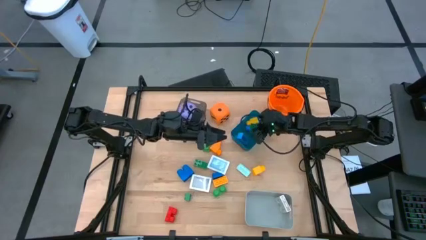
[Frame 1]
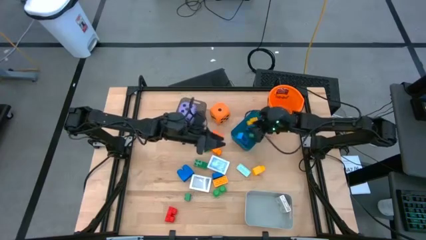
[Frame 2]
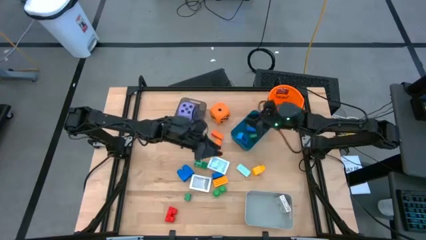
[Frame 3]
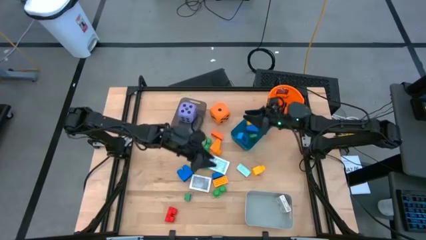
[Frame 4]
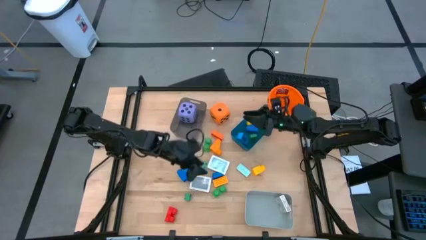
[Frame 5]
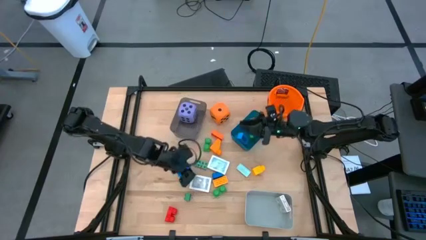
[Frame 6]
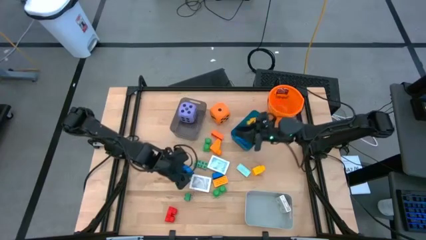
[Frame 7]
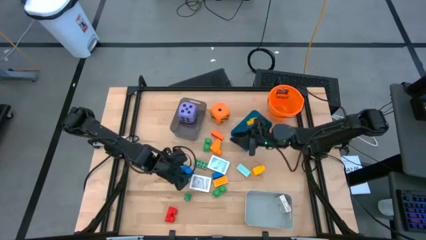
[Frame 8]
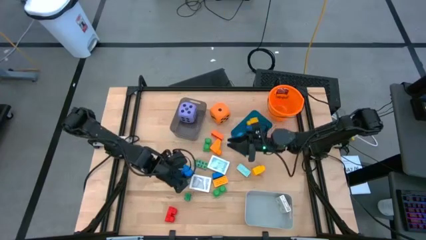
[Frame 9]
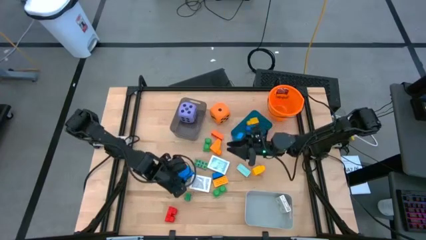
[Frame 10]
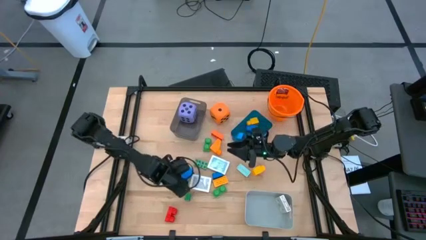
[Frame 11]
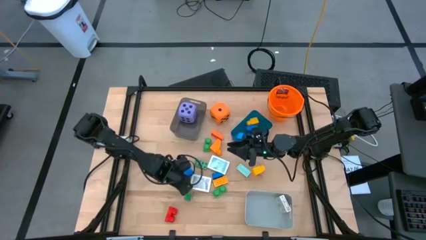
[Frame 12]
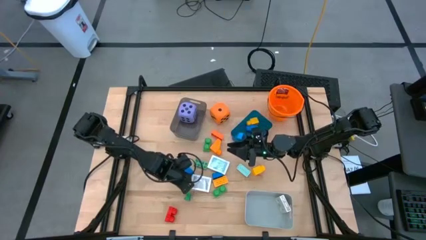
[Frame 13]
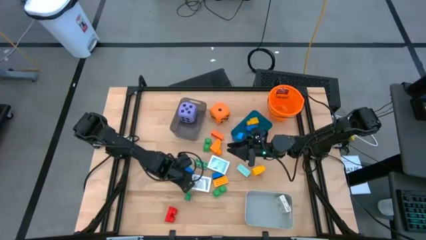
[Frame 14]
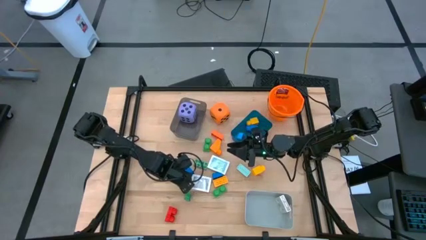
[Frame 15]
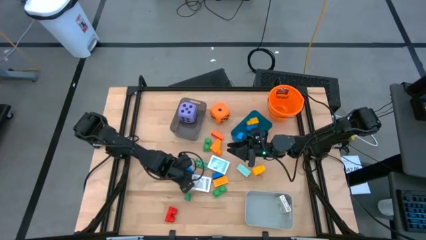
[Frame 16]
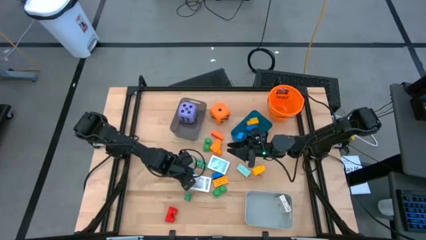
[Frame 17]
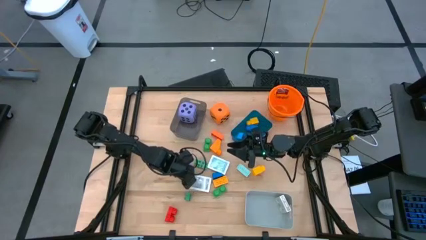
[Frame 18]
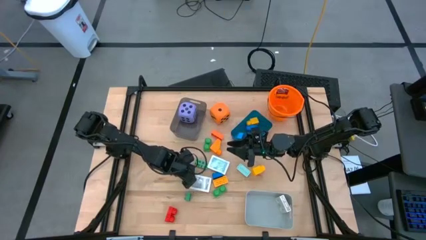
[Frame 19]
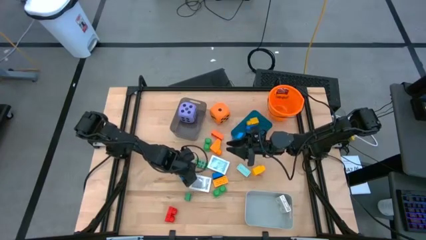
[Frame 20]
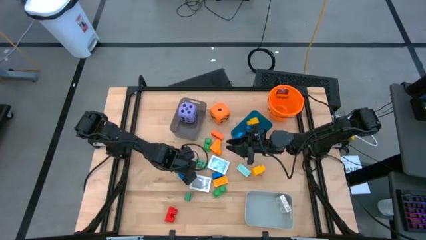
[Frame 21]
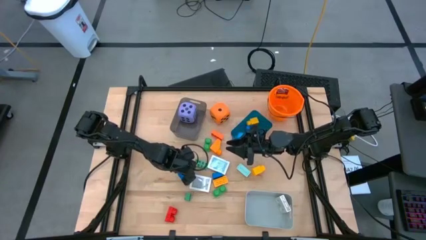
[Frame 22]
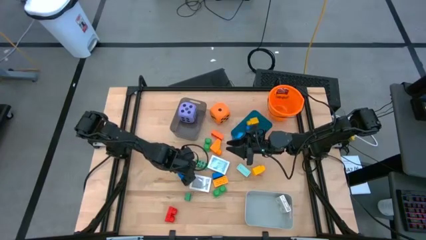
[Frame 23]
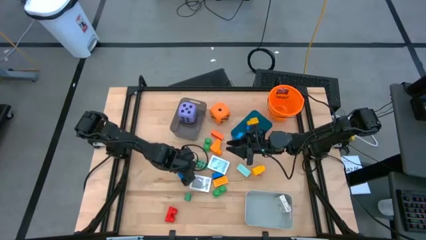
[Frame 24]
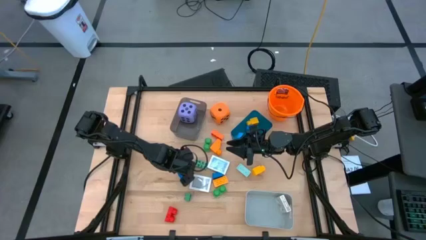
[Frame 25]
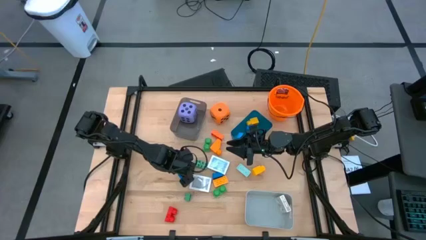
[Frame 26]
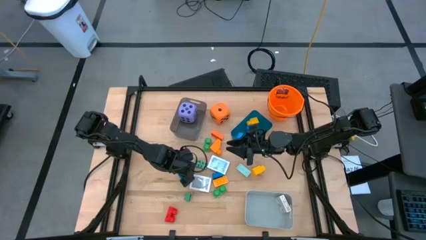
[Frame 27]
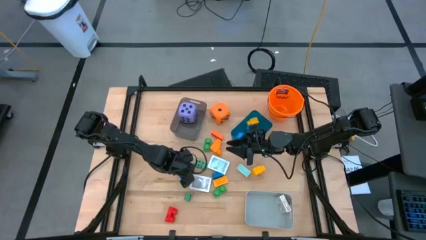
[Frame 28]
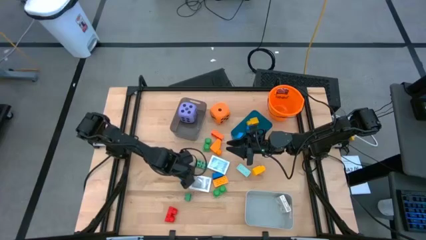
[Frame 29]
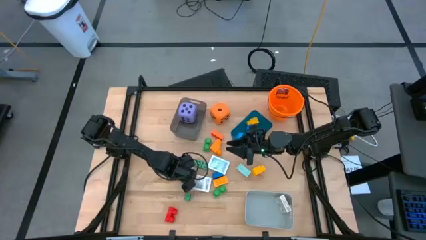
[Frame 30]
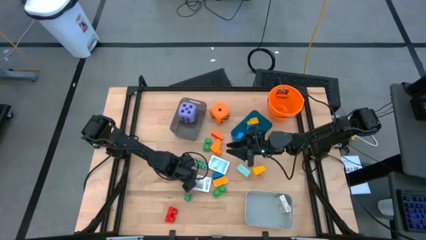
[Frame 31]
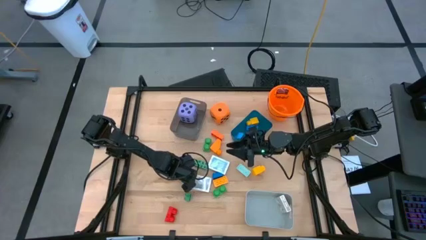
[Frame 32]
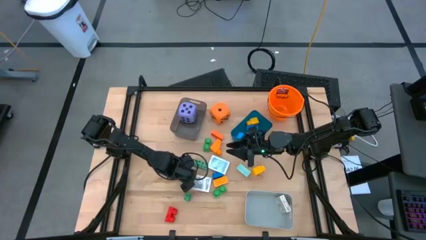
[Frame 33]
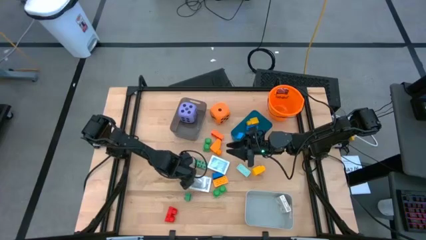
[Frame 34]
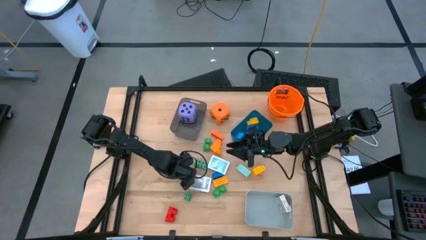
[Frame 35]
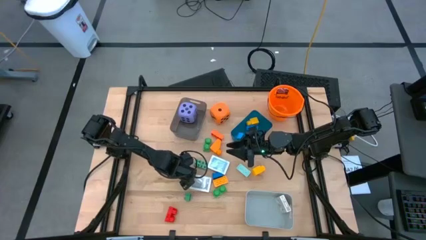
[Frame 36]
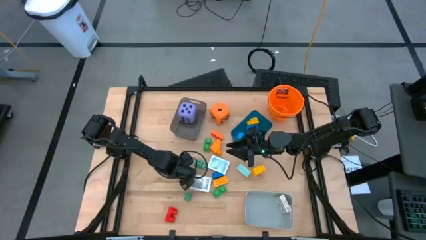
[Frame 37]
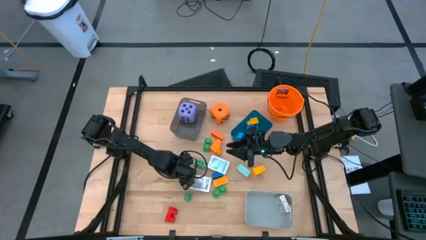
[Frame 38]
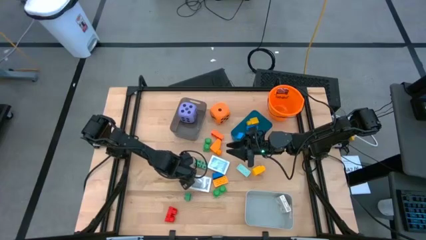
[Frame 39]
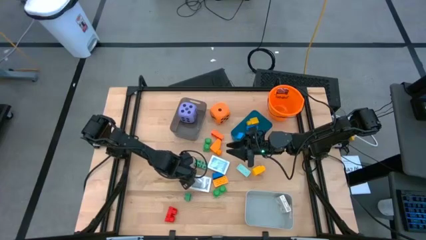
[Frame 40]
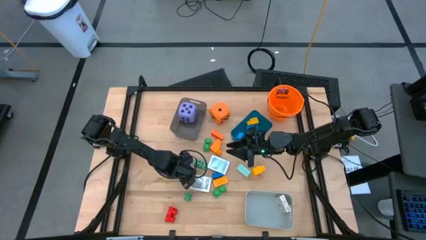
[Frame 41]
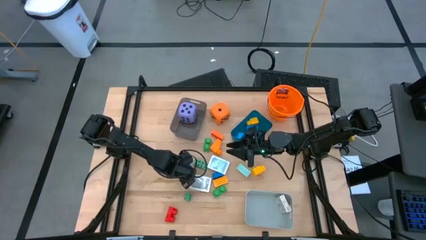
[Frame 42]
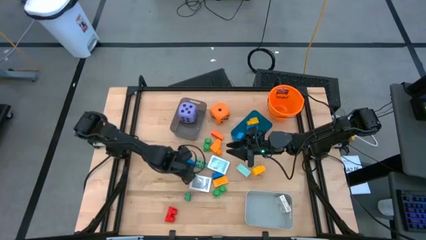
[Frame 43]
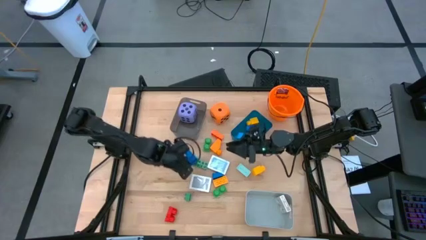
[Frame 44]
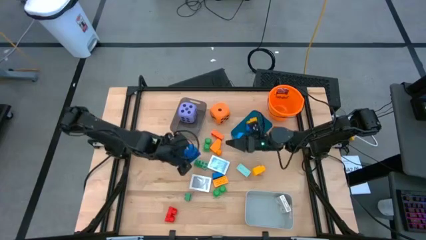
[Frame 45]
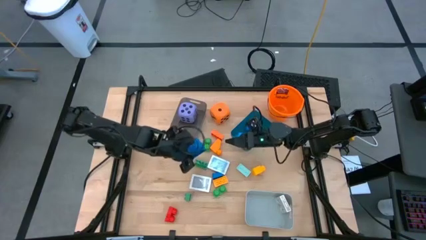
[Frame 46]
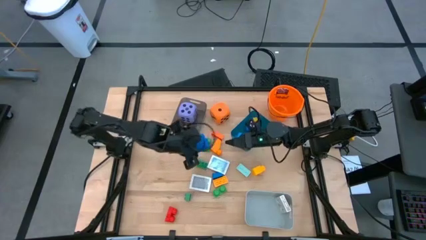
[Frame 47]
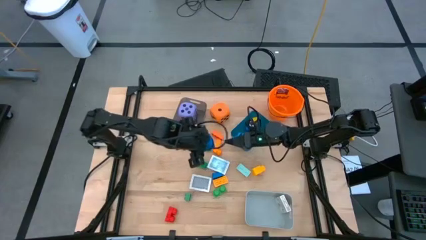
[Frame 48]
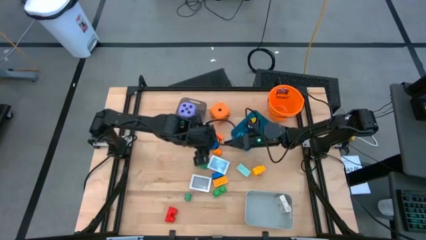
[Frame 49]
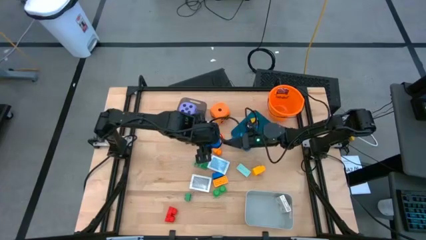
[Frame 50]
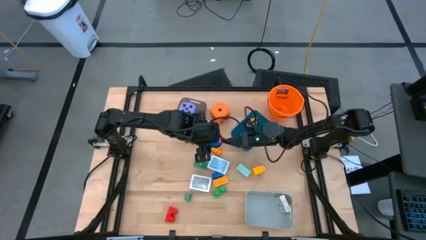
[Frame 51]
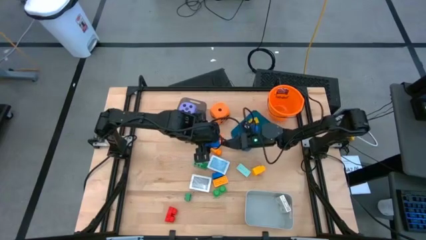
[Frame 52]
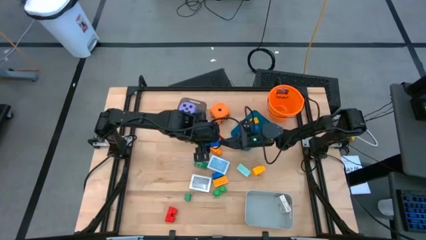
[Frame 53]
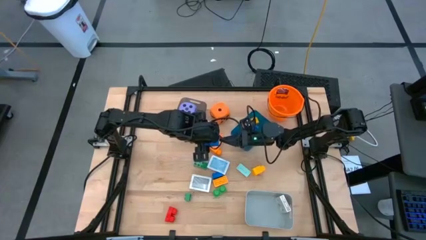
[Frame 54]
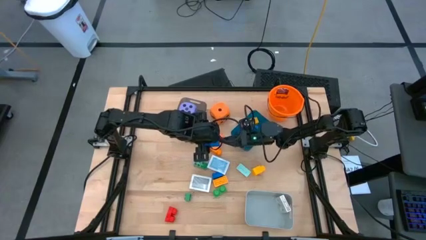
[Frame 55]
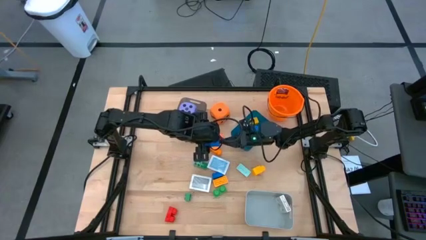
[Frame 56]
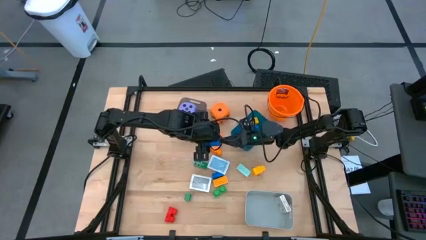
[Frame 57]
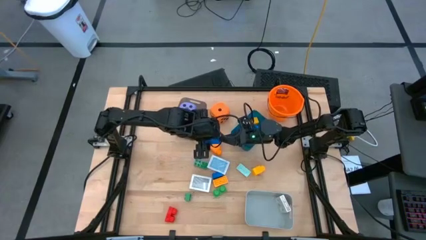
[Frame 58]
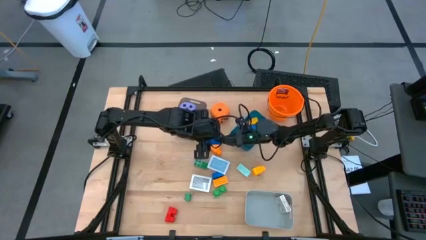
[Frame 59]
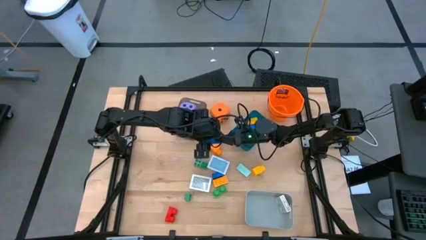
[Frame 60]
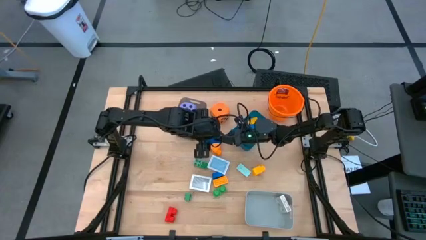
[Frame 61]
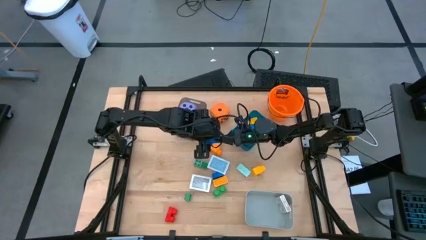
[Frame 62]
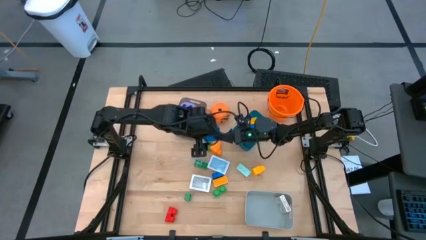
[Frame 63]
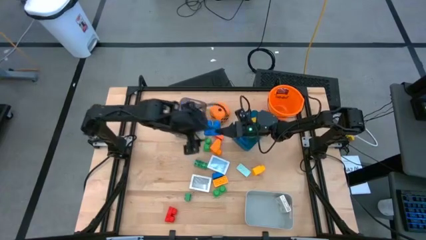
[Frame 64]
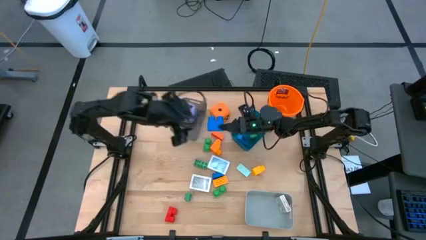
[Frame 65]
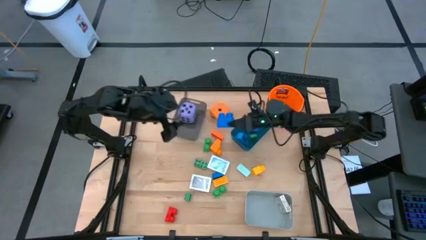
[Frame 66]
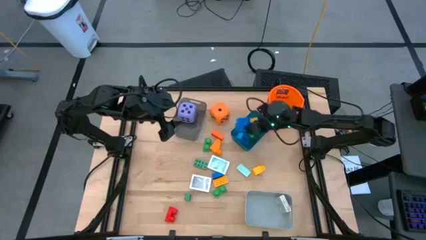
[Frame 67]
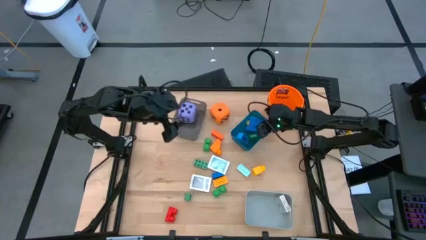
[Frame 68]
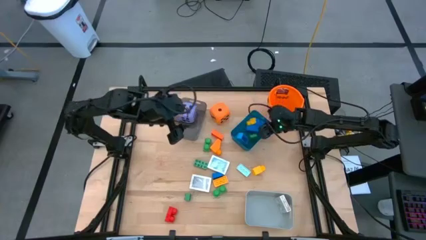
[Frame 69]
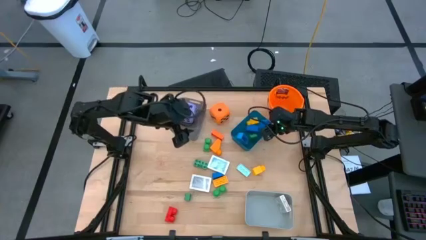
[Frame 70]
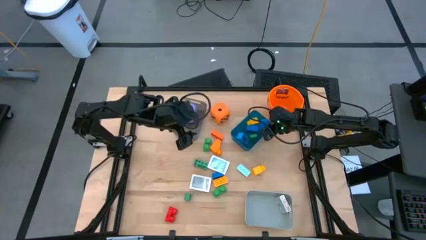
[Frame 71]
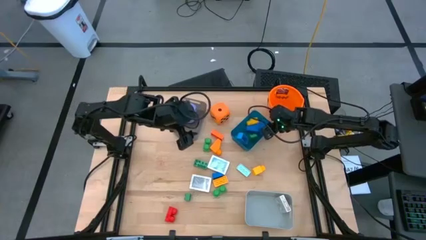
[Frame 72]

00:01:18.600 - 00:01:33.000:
Task: Pick & Place Toys
Put the left blue game piece into the blue bin

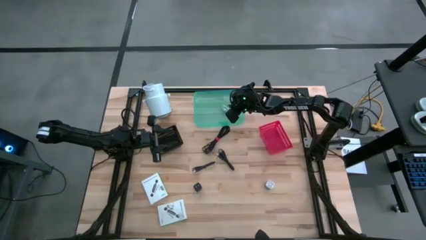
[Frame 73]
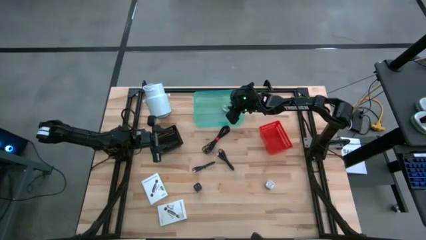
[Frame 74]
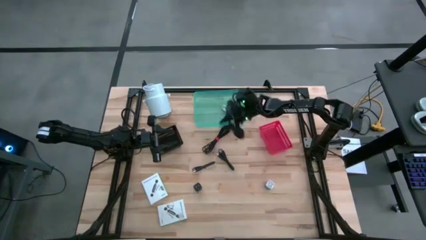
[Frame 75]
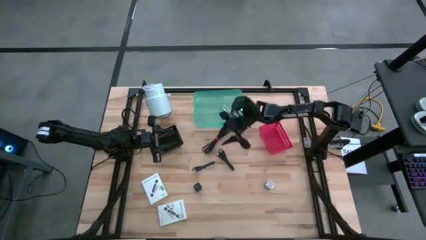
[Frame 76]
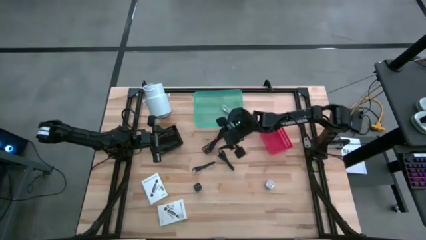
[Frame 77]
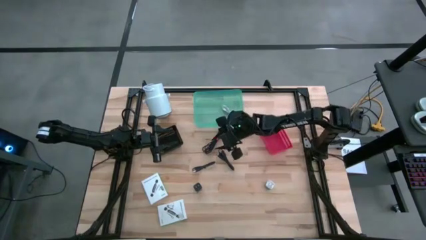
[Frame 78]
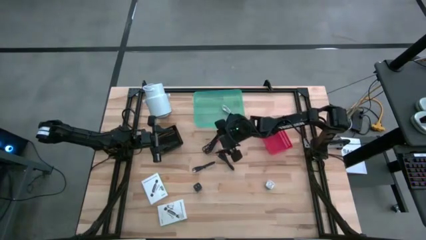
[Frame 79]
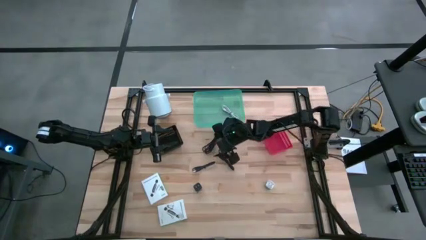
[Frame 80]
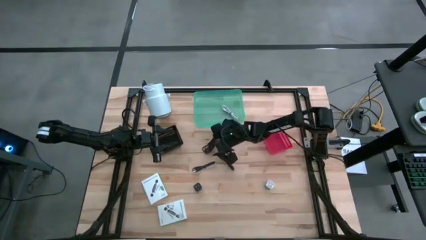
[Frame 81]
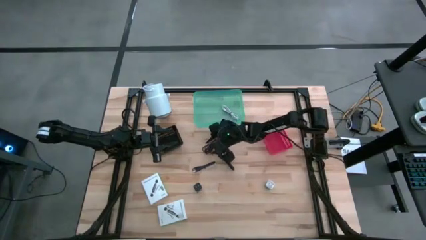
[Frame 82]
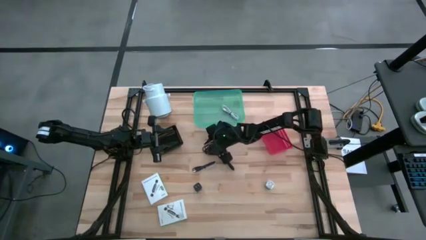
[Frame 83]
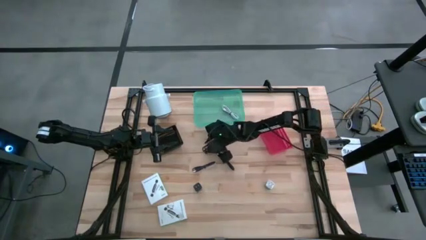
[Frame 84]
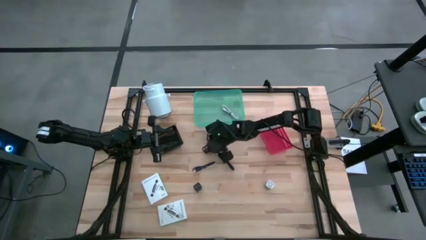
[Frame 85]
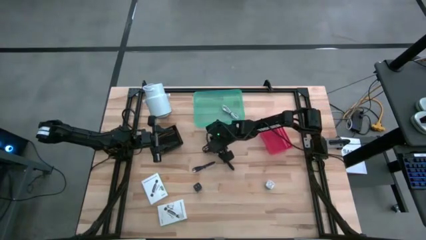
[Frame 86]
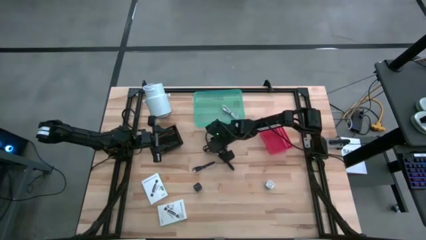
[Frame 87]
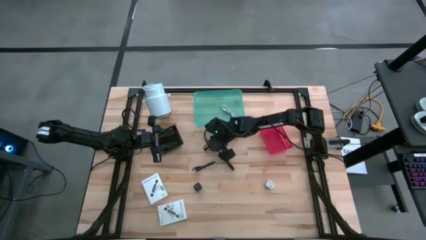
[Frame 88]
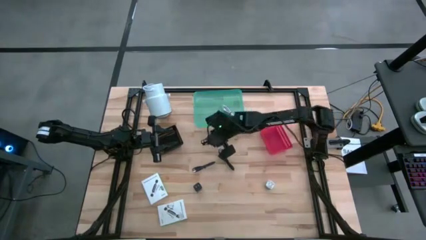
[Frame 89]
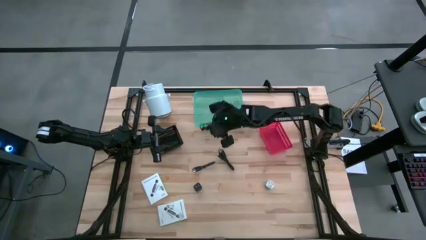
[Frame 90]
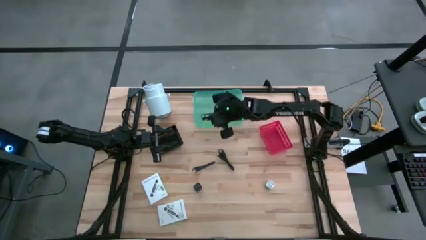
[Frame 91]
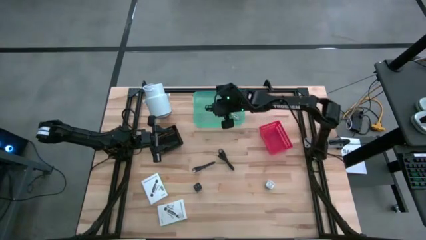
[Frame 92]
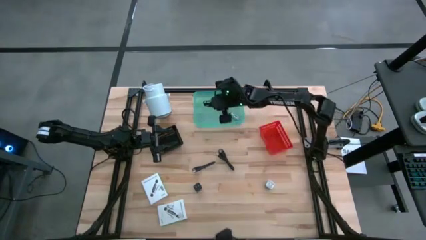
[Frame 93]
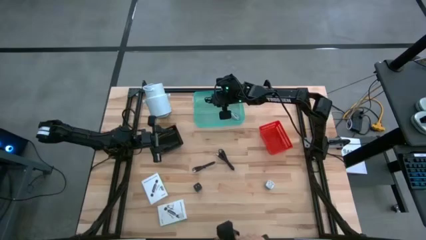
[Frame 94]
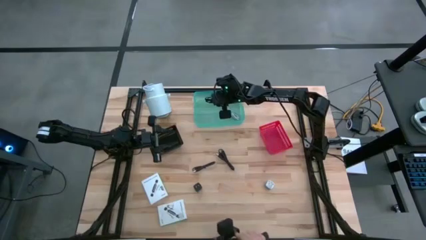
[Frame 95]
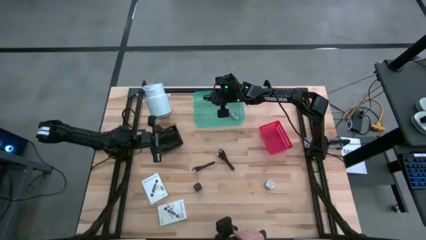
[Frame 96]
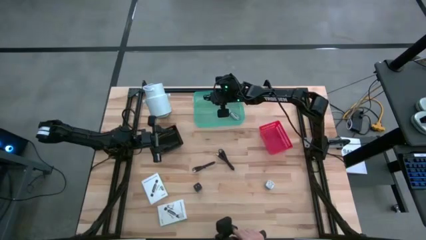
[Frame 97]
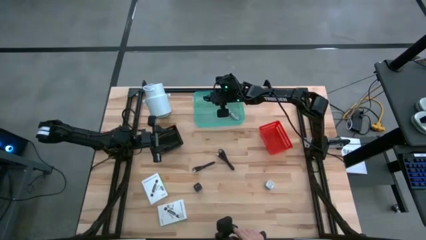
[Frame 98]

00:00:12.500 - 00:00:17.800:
Task: Pick and place items into bin
Put the top black charger cable into the blue bin
